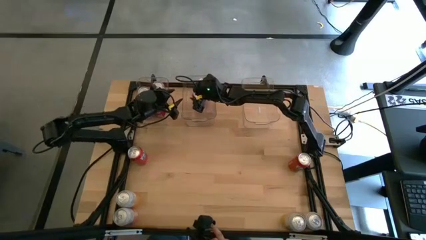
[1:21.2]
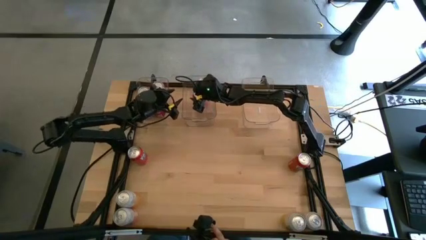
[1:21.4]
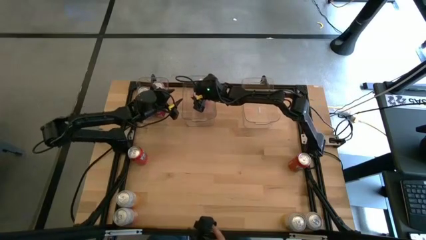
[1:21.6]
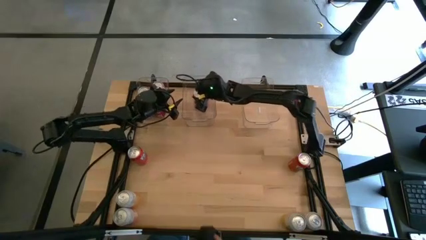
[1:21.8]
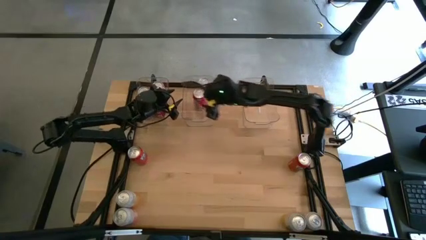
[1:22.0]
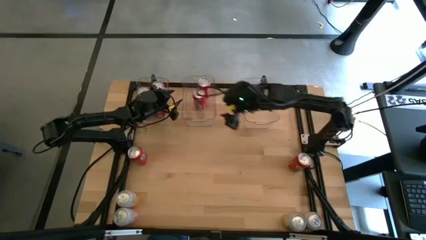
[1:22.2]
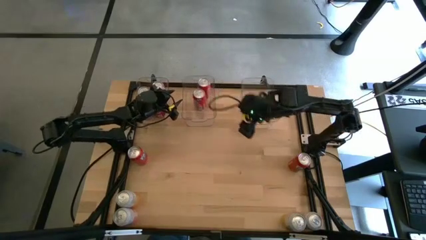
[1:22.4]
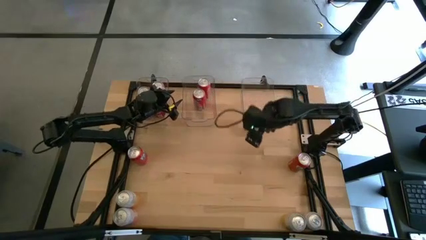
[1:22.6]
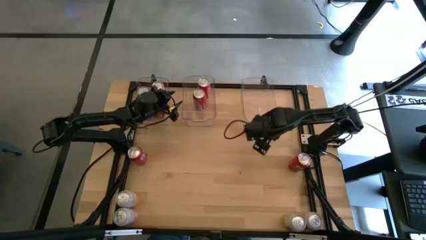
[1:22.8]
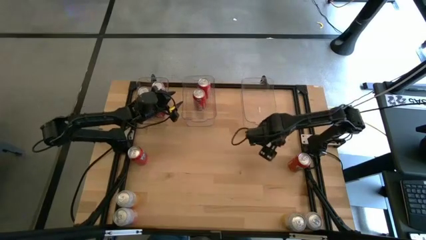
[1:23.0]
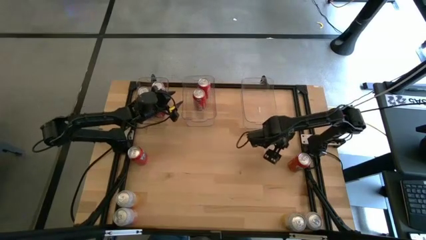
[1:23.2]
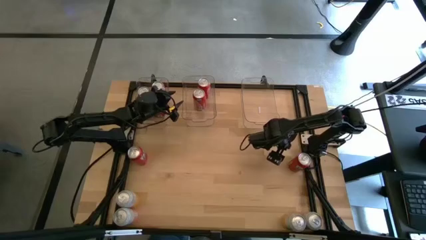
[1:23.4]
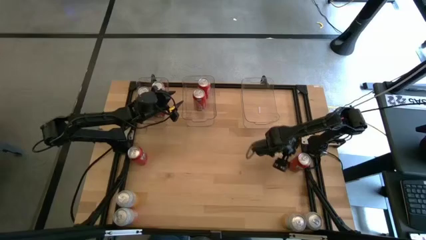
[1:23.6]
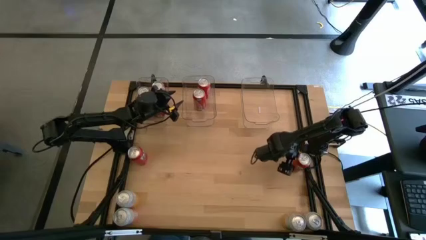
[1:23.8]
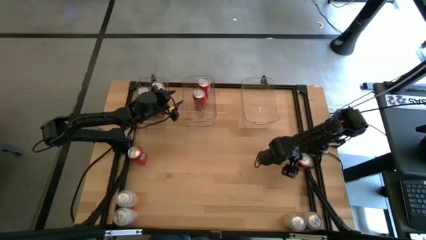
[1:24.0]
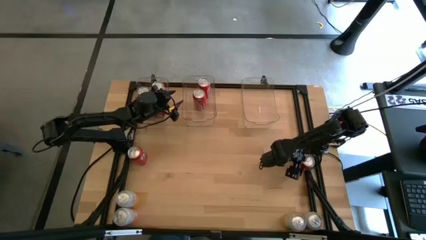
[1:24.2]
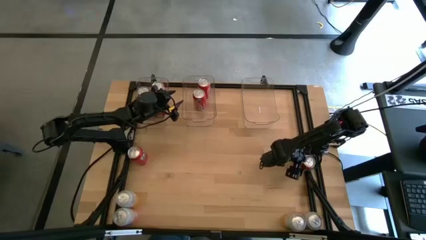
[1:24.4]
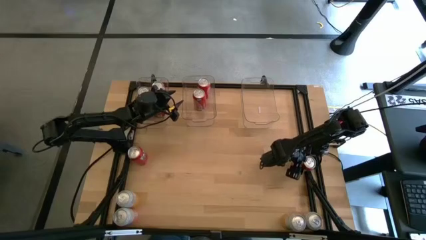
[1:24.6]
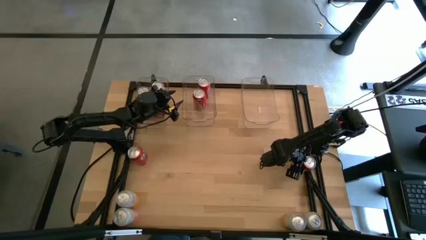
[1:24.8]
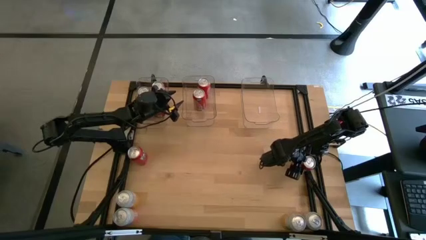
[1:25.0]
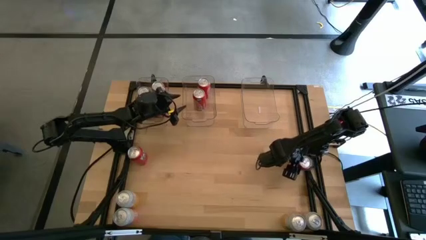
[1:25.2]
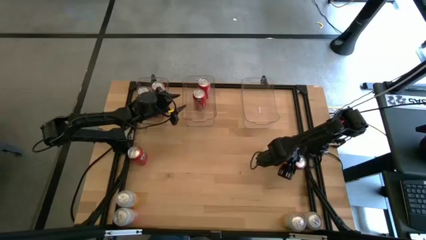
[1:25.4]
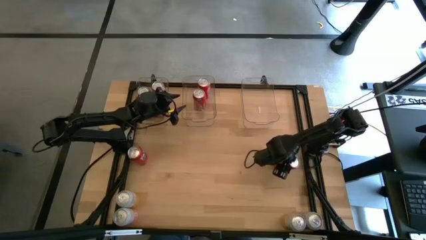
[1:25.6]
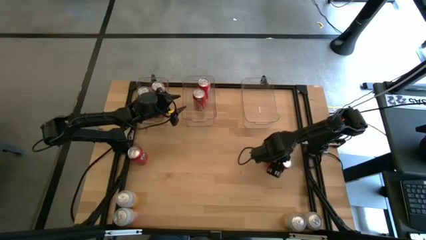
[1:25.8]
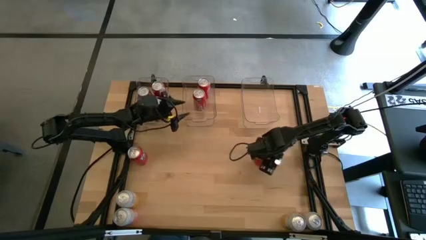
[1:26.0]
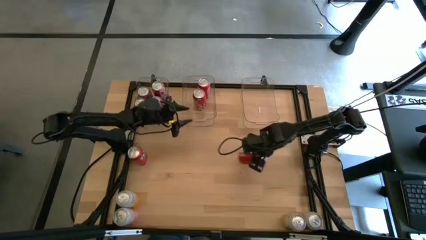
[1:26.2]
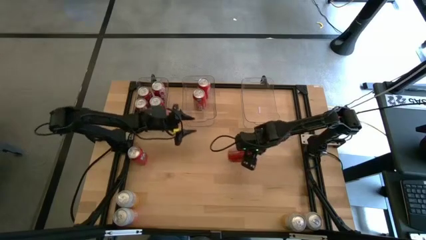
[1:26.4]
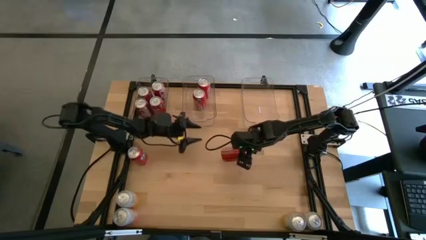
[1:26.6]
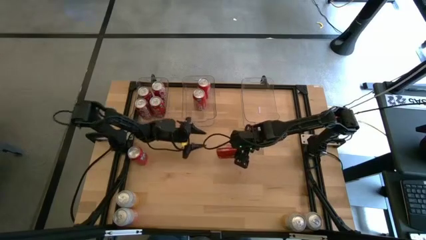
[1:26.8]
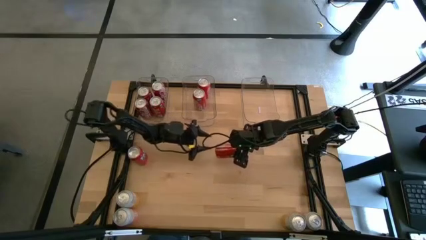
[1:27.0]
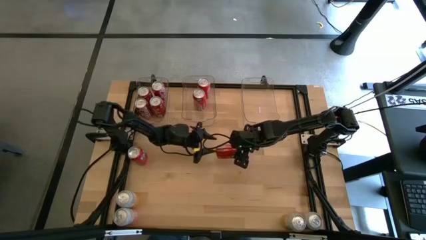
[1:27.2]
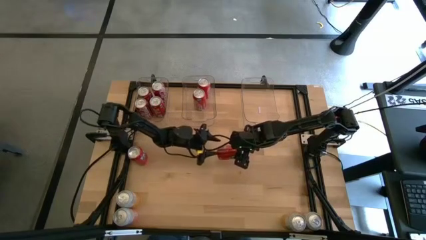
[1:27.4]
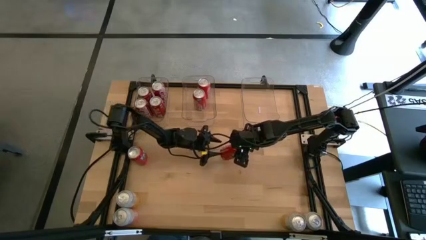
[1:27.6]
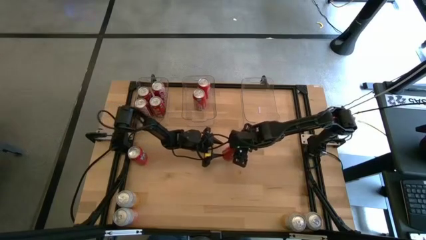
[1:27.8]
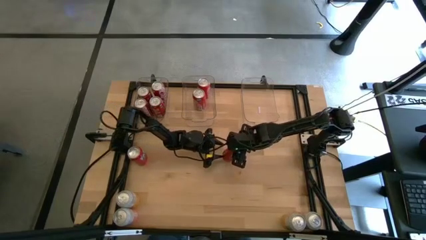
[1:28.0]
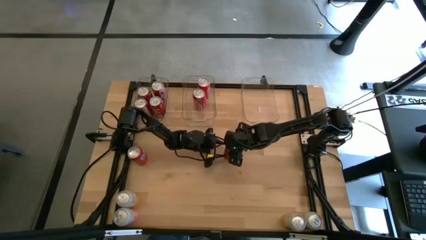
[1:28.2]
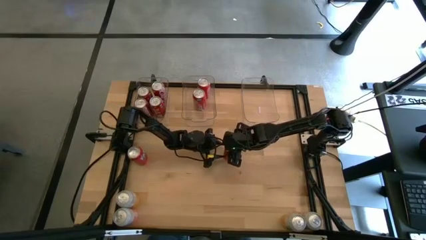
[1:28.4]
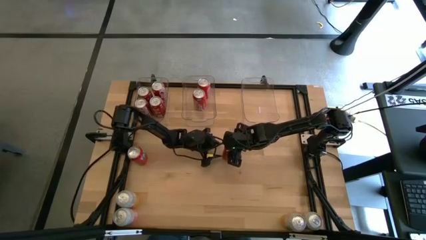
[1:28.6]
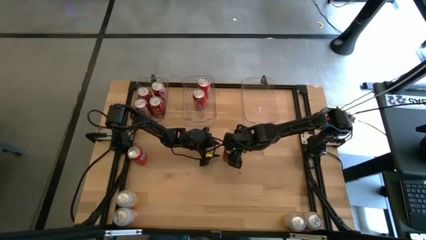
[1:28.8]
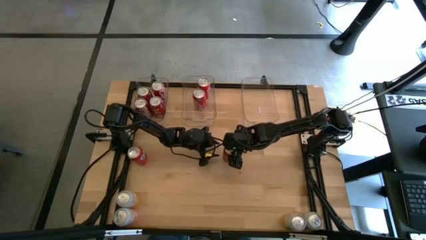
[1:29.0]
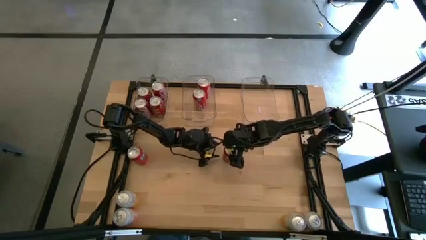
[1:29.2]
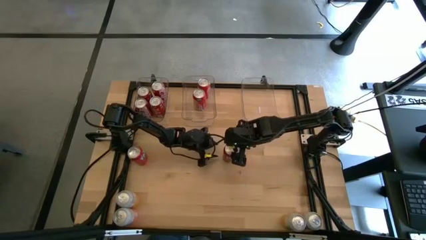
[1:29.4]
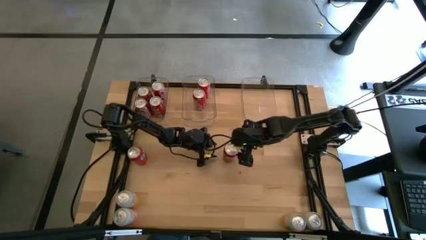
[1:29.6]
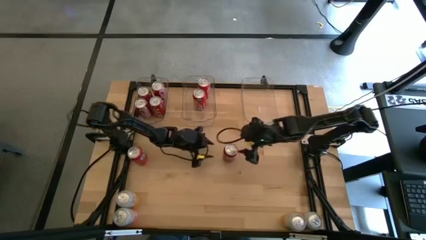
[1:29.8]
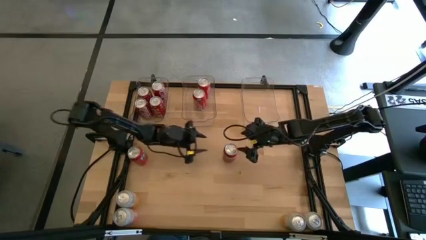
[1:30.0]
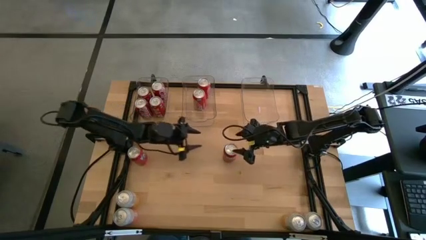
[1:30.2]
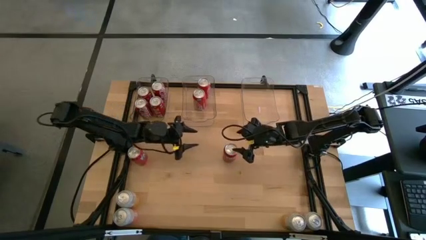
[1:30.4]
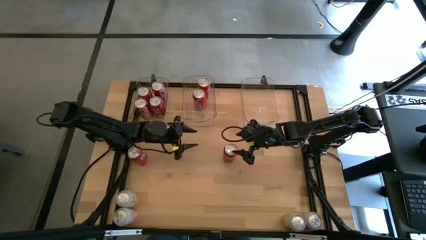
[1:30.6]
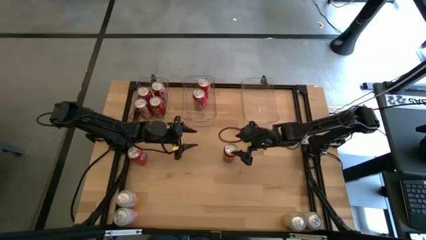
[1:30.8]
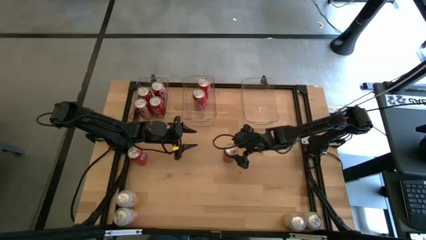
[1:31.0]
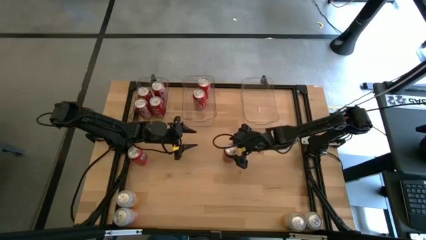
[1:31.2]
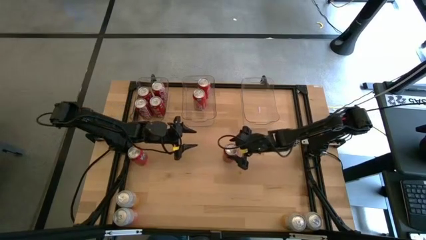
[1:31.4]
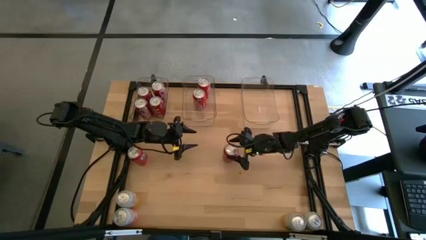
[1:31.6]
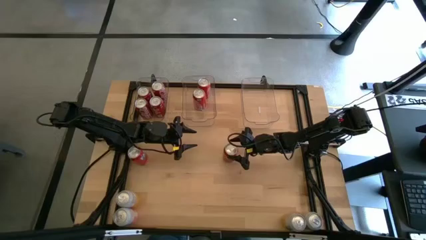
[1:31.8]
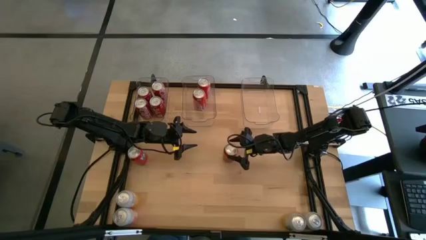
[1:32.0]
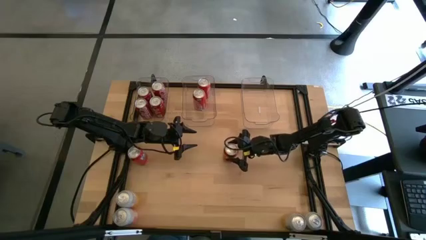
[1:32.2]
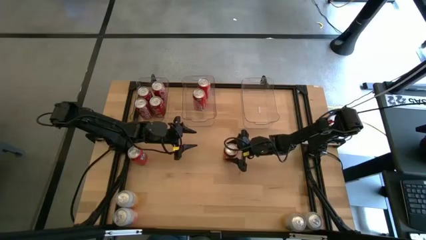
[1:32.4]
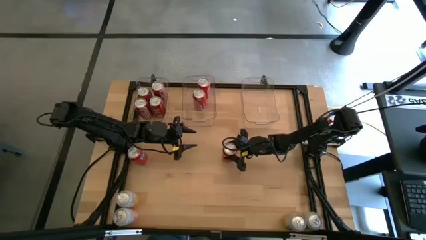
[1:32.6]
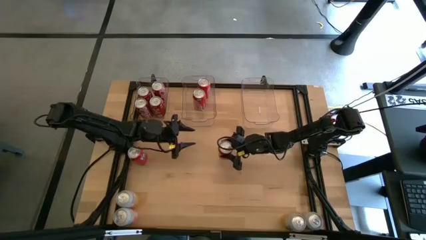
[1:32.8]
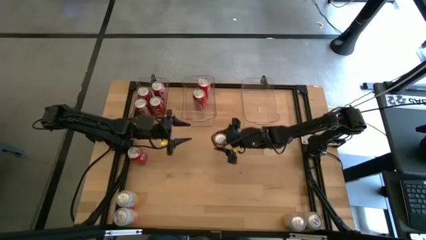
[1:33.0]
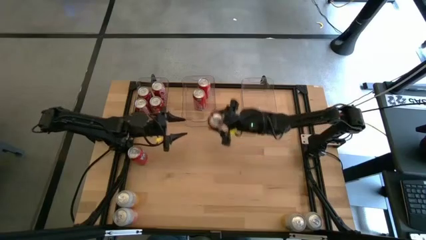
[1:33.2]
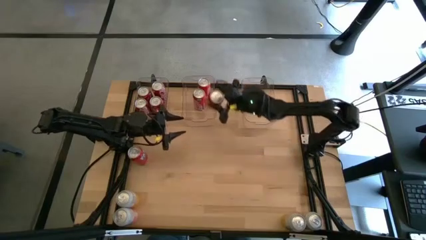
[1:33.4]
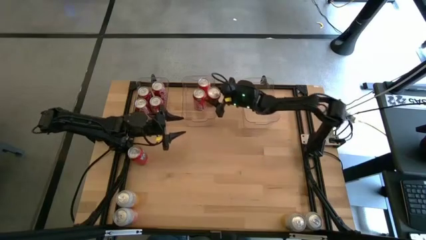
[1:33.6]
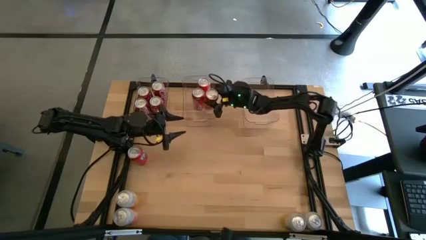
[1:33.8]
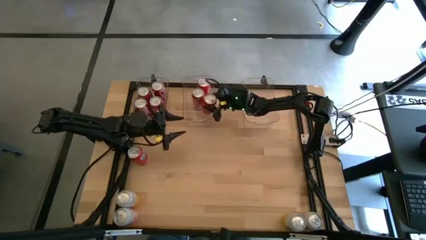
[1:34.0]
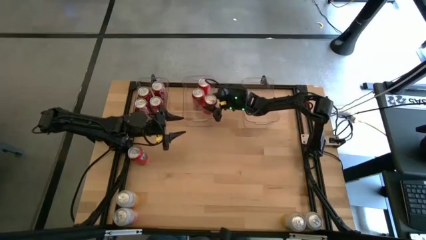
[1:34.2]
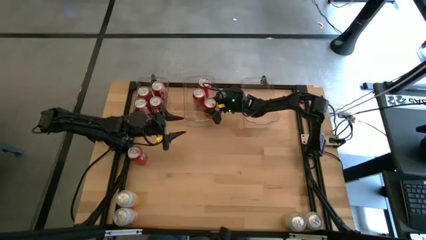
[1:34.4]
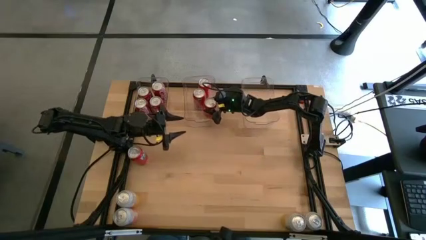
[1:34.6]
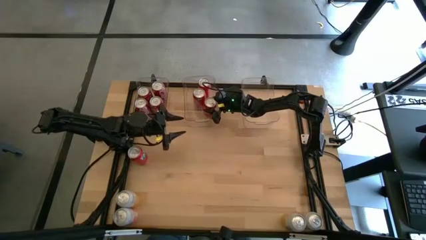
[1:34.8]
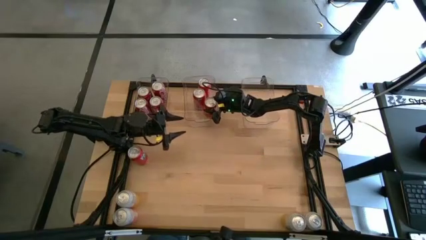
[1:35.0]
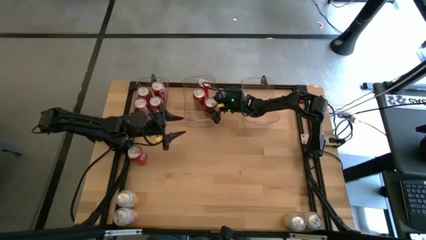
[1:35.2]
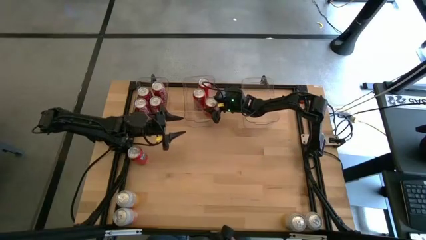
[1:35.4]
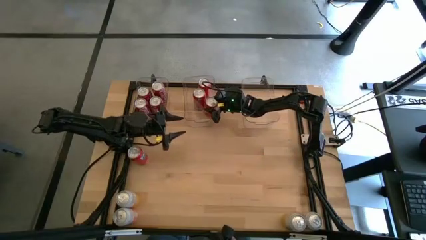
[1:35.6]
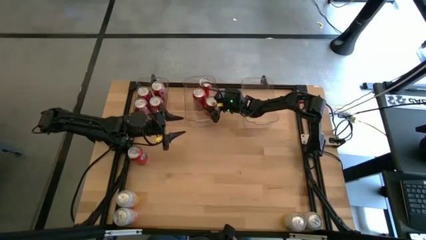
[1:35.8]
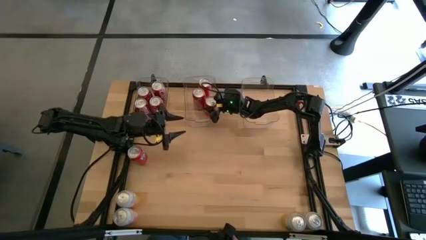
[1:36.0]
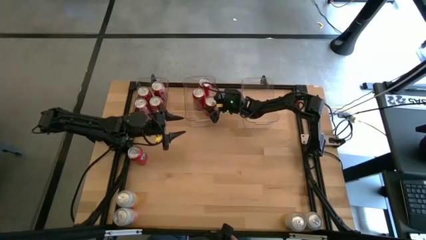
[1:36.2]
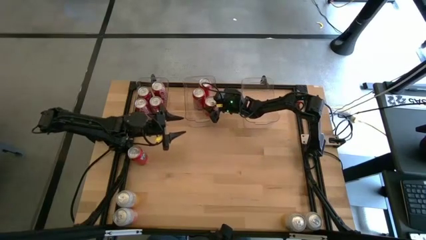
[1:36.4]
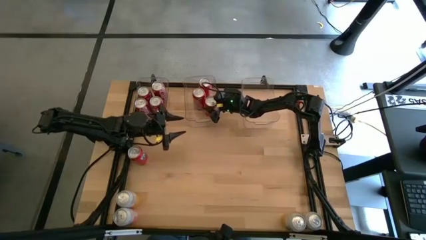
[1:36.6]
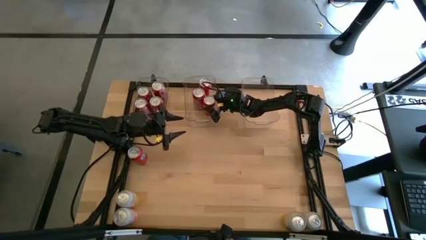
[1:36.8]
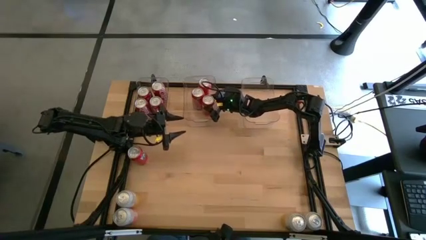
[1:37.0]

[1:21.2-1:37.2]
Task: Sort soda cans
Put the orange soda can into the middle transparent bin

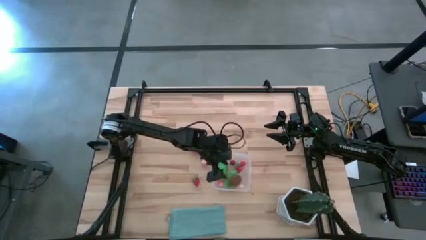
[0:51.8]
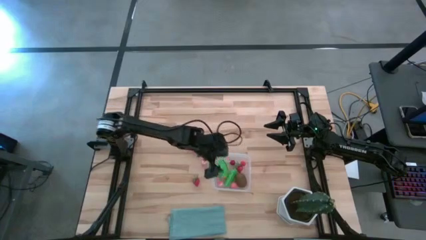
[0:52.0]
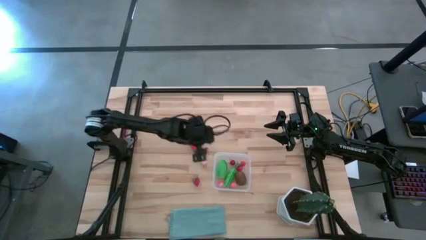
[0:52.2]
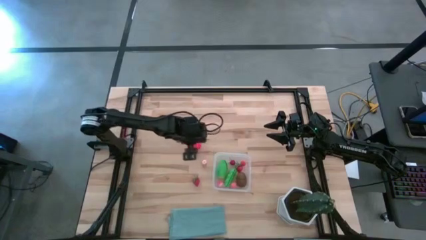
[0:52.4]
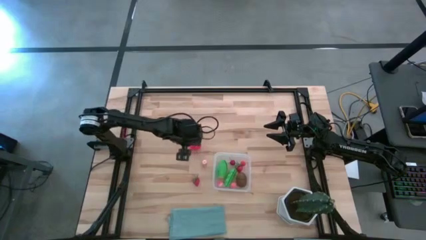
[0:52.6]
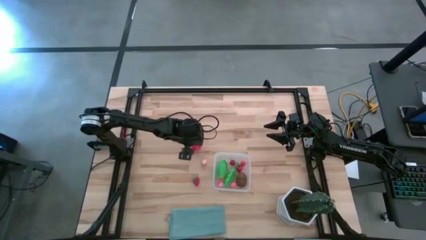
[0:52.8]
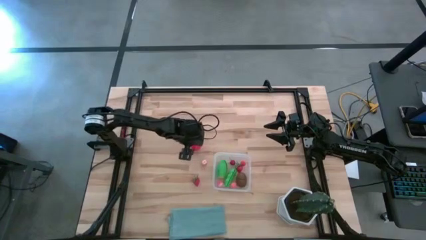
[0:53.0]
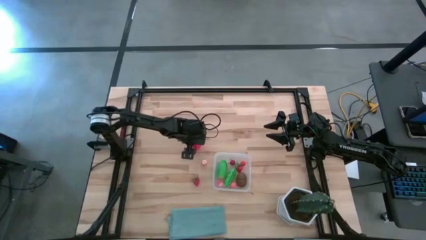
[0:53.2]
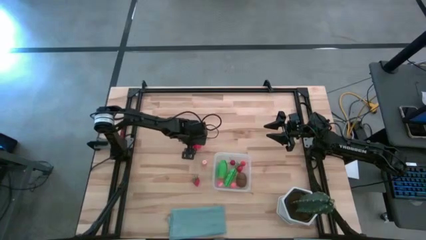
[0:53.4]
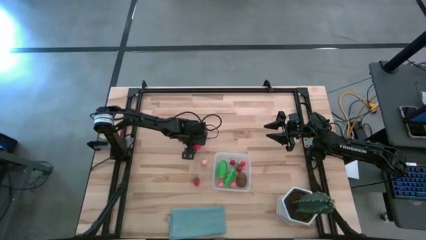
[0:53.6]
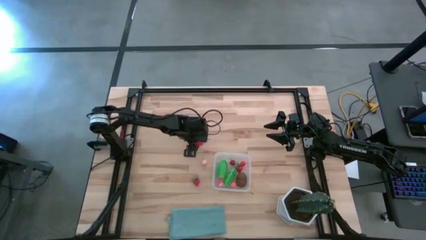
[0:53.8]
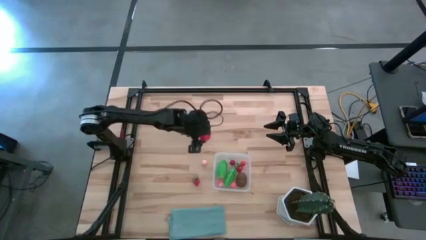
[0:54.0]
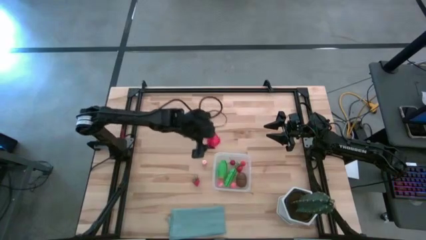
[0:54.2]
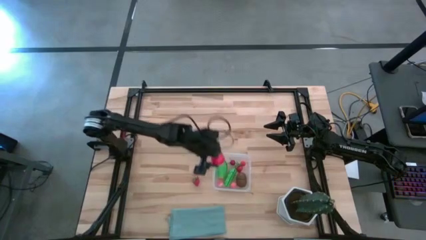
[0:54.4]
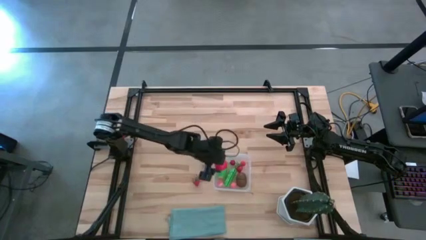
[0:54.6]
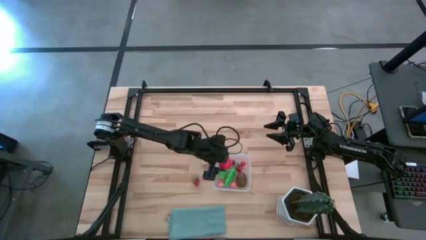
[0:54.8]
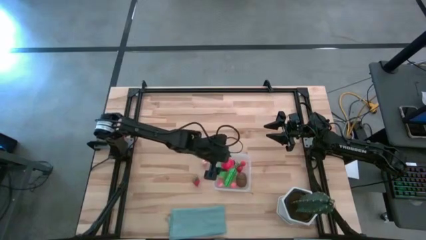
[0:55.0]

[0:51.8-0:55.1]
Task: Pick and placing Produce into tupperware
Put the tomato into the transparent container
